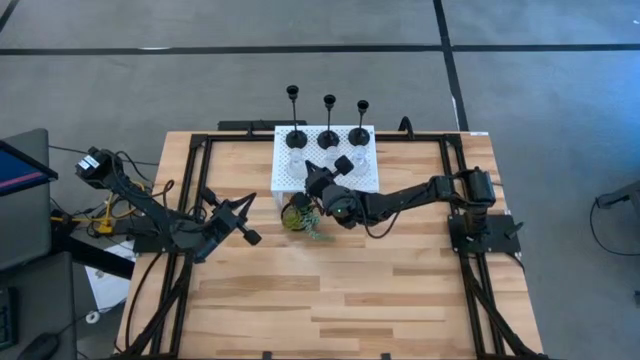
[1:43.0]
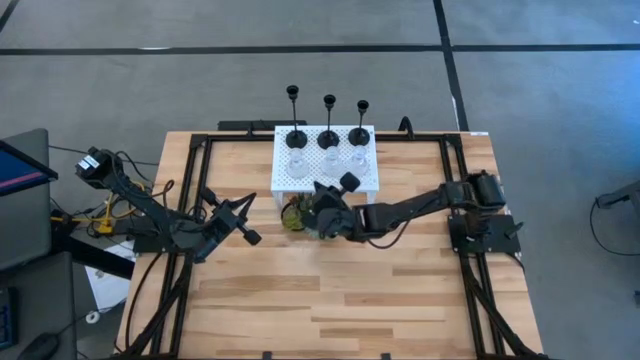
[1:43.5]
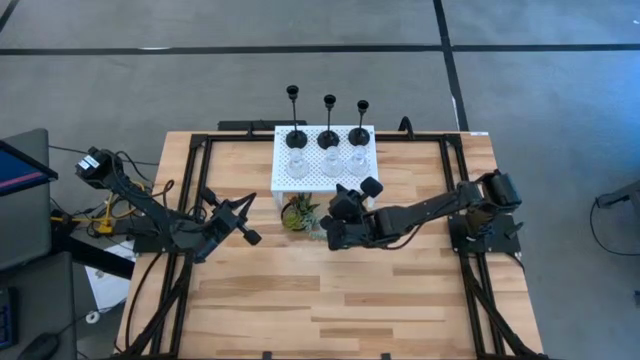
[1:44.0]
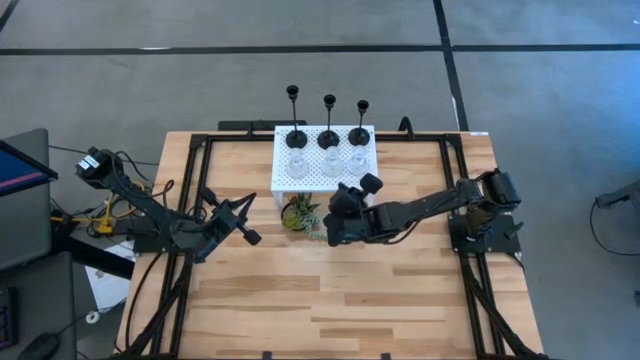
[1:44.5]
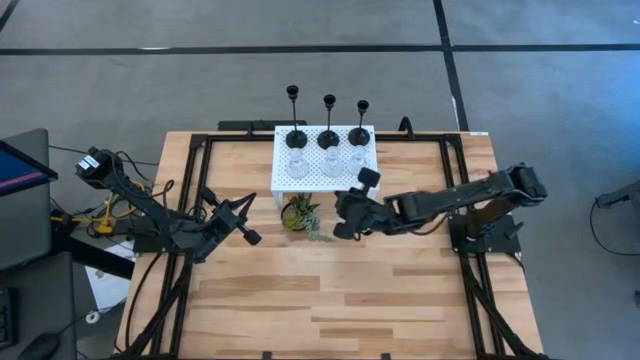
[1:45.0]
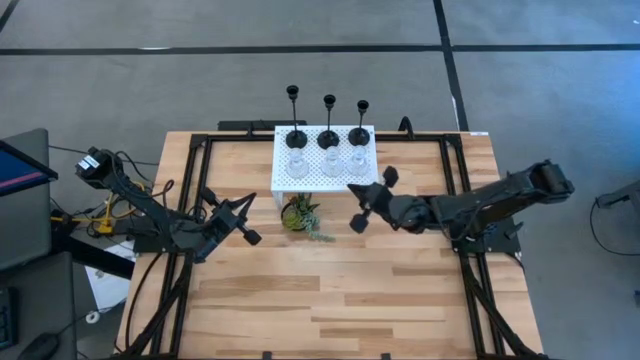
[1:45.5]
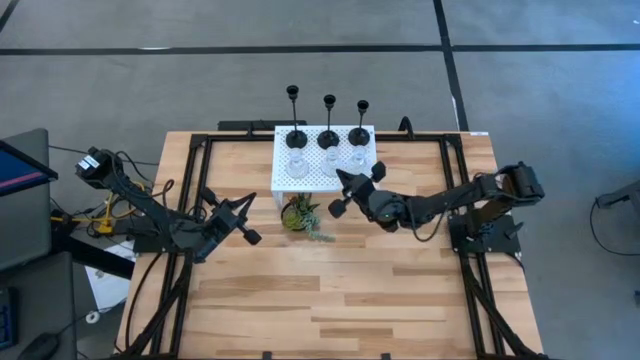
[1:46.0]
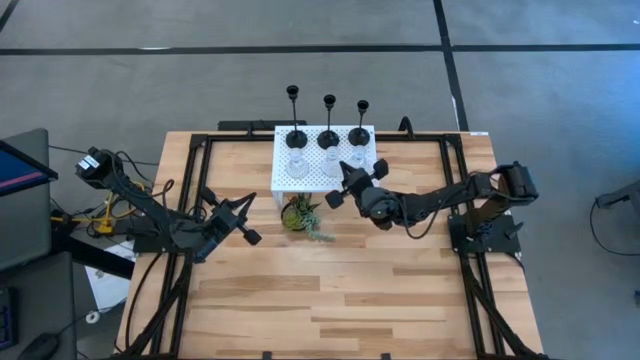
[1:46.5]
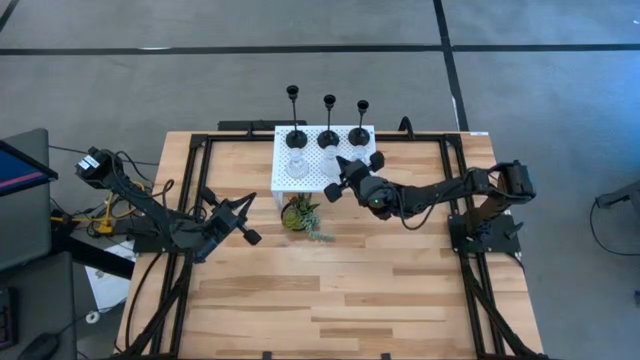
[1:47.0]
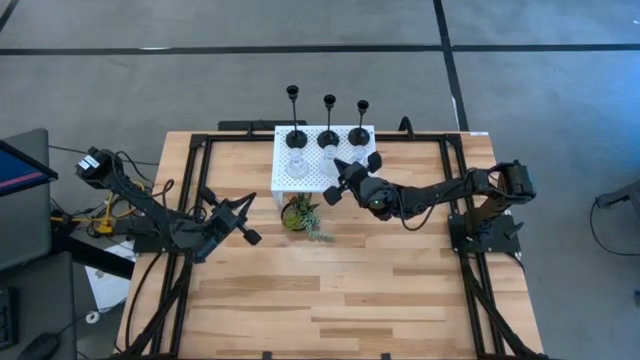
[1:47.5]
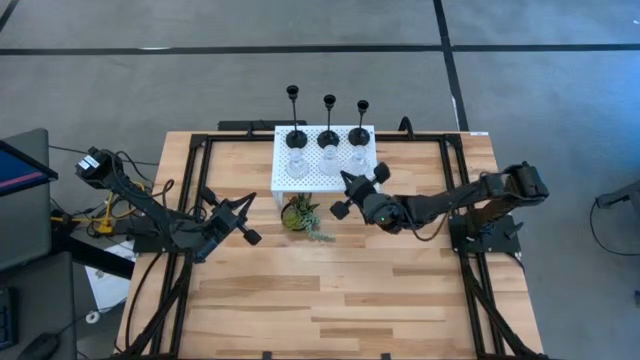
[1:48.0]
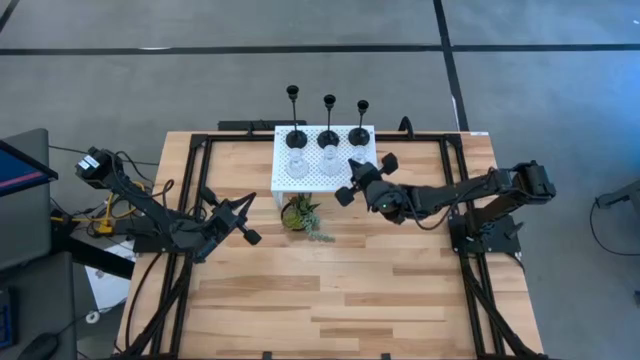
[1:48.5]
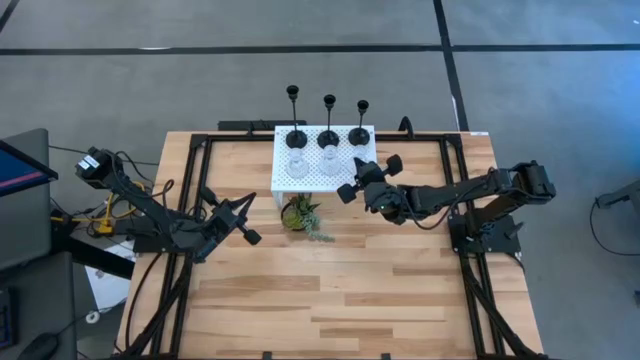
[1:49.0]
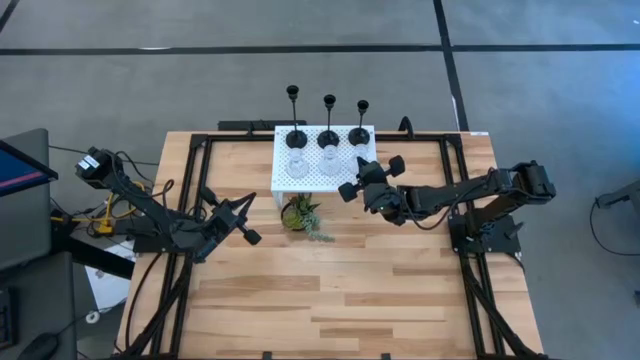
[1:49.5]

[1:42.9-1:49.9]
Task: Pick & Place candle stick holders
Adjust the transparent glass candle holders on the shelf

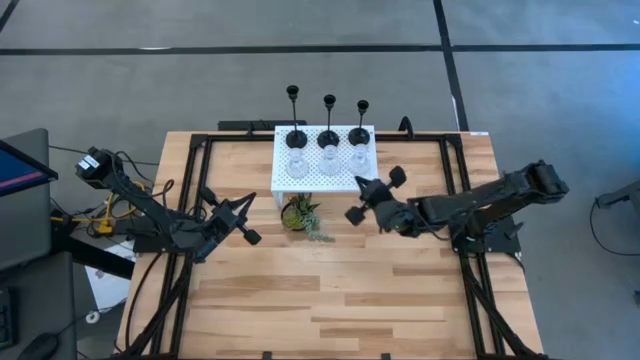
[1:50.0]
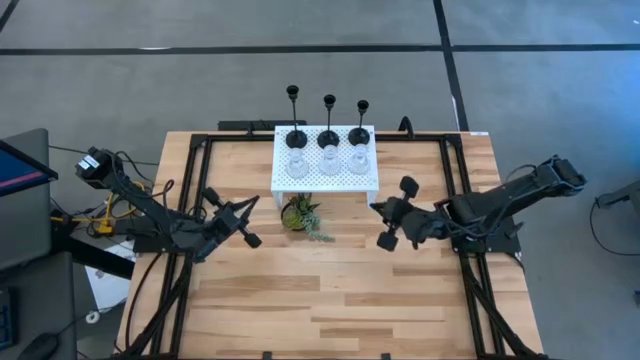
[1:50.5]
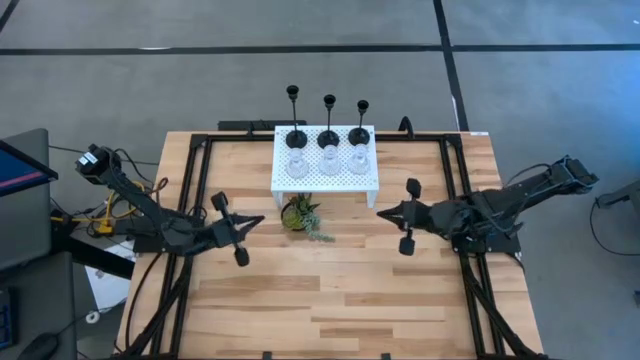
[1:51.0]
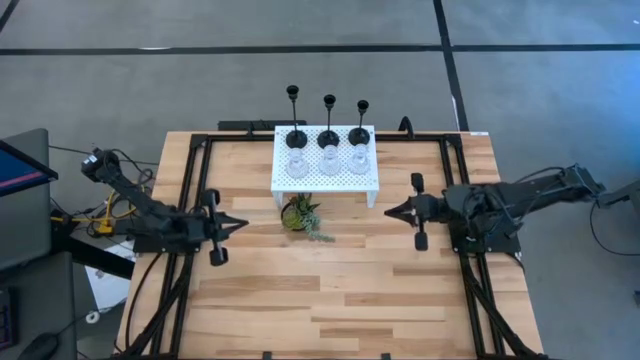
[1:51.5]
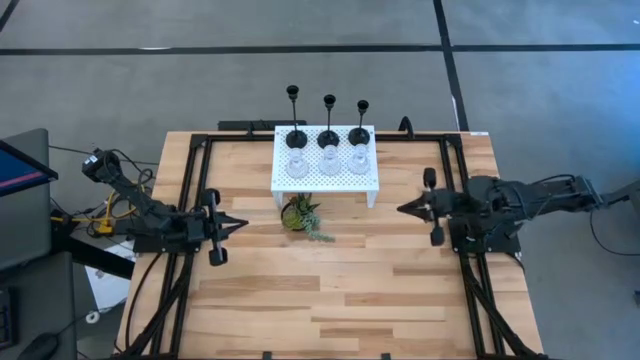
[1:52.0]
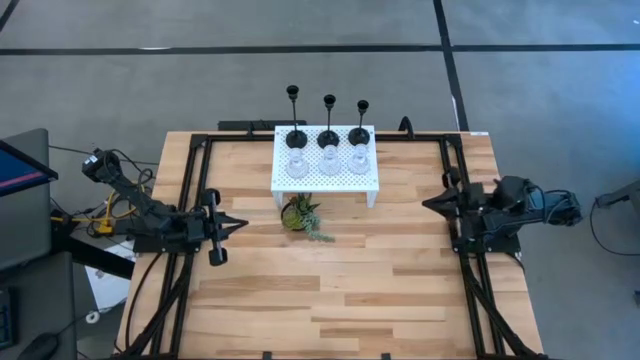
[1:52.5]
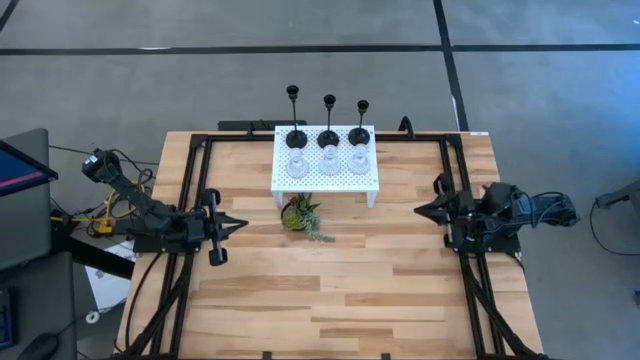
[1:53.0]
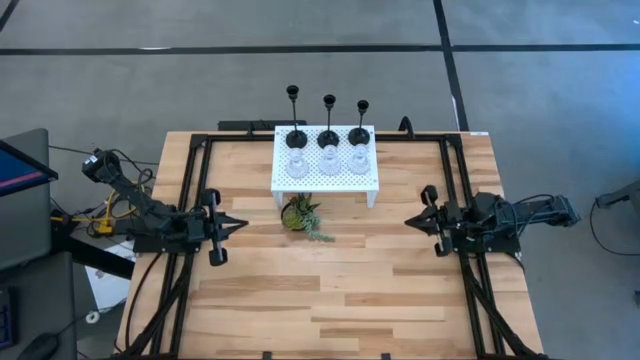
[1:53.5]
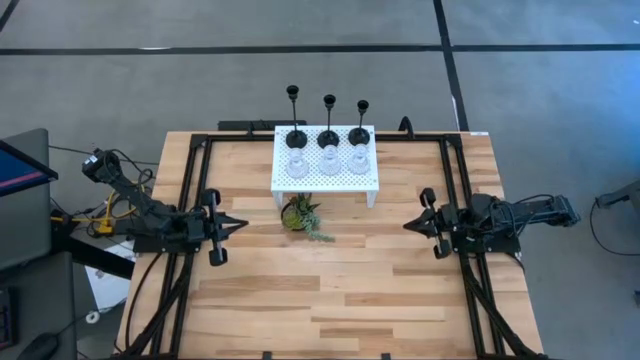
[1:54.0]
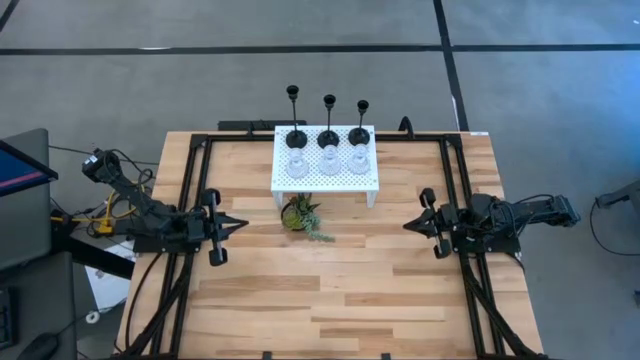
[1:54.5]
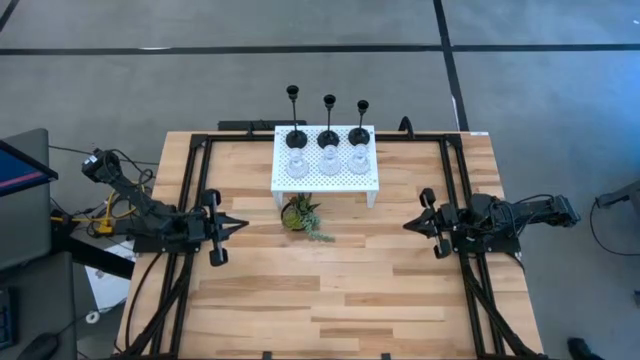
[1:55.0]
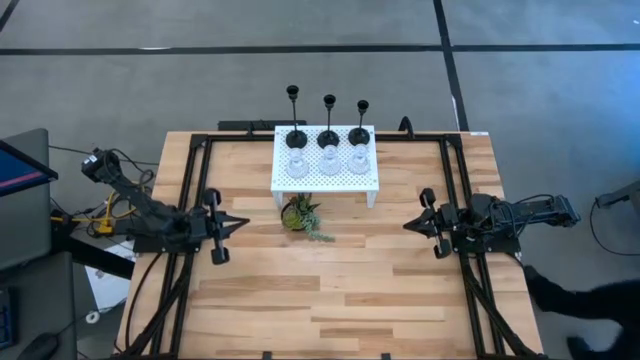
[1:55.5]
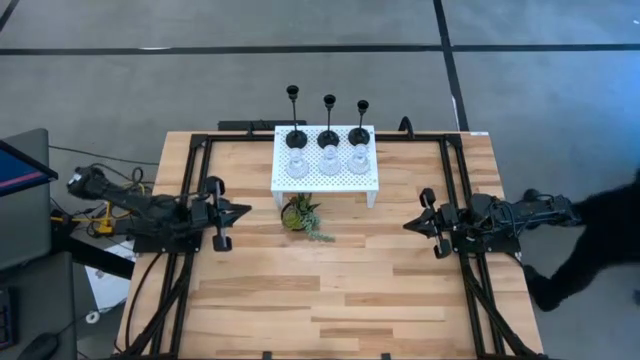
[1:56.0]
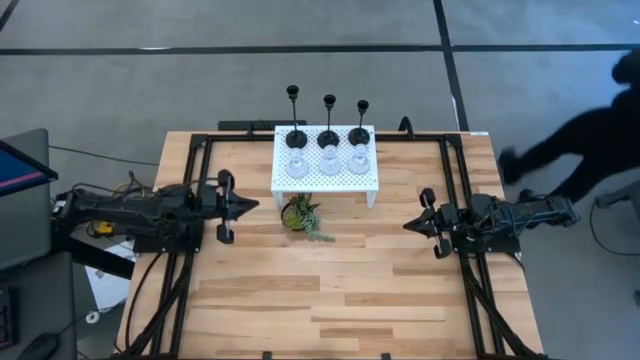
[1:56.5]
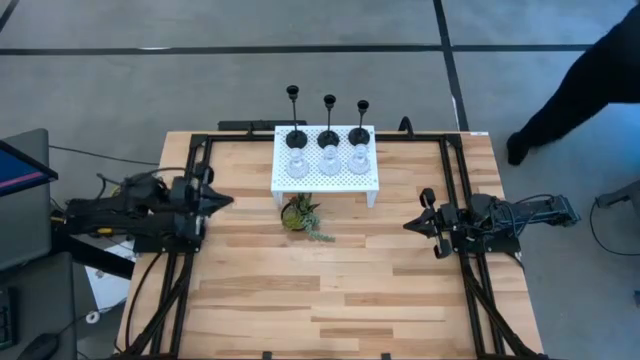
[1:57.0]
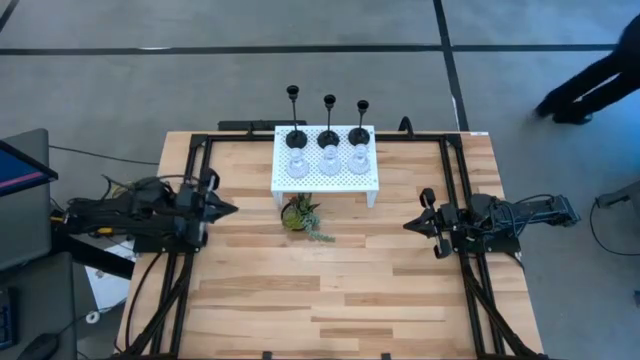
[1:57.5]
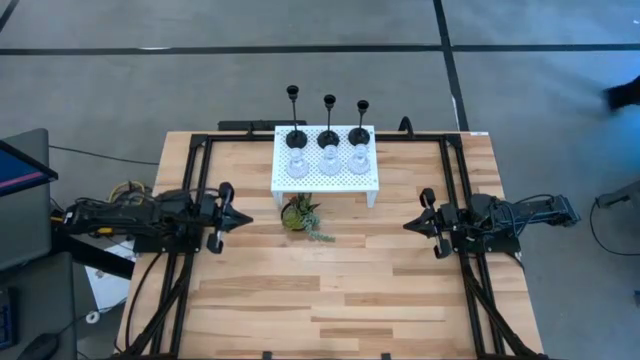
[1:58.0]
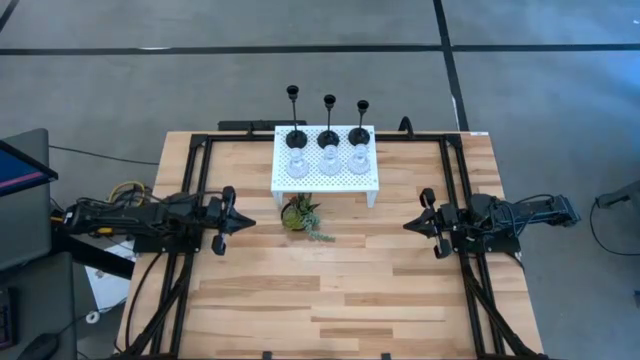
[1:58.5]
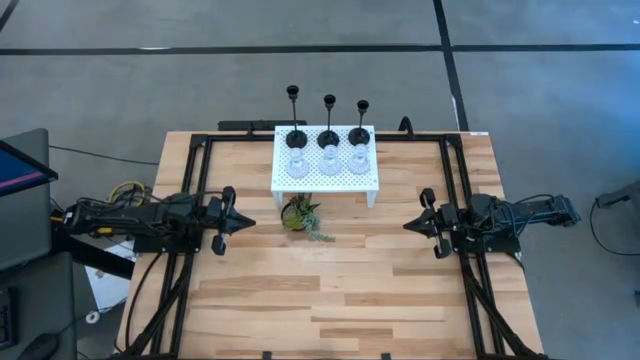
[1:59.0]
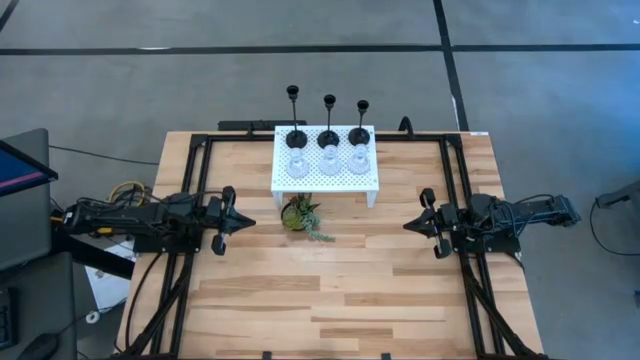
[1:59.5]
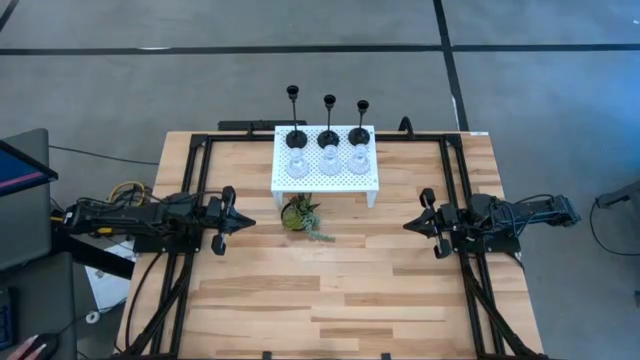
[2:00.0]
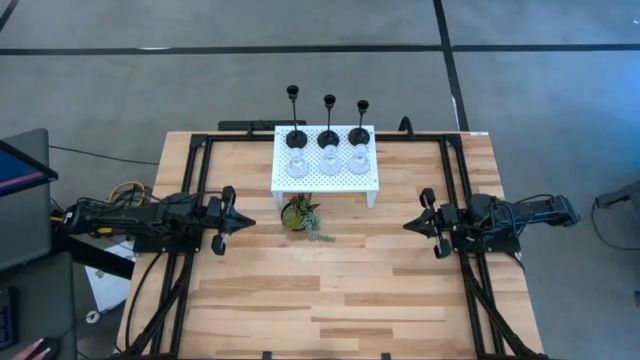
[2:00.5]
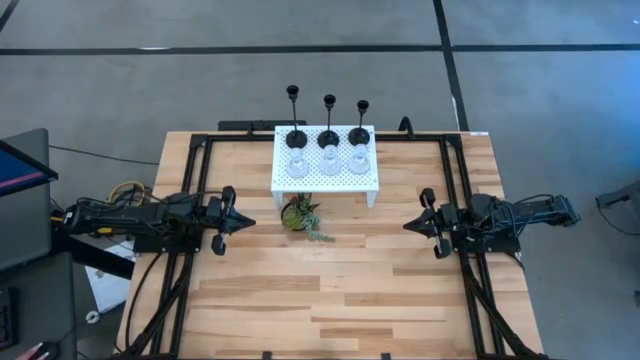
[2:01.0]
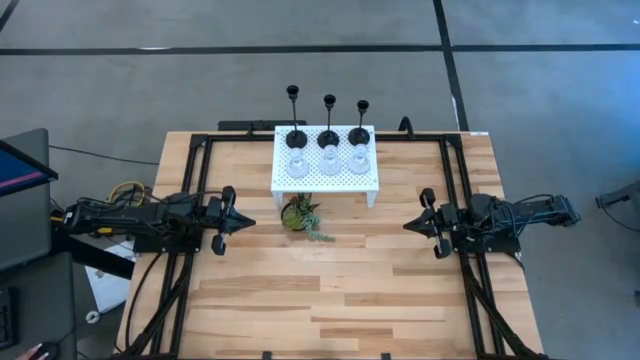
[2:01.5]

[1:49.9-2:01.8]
Return to Home Position

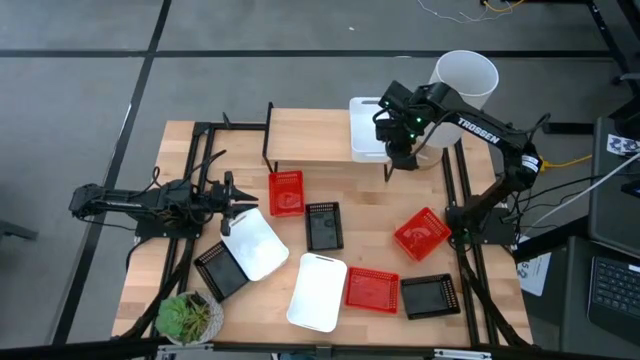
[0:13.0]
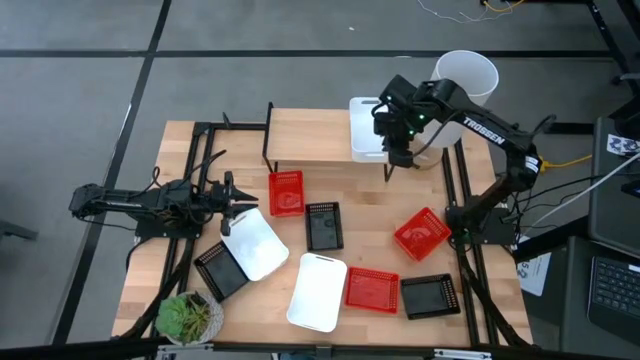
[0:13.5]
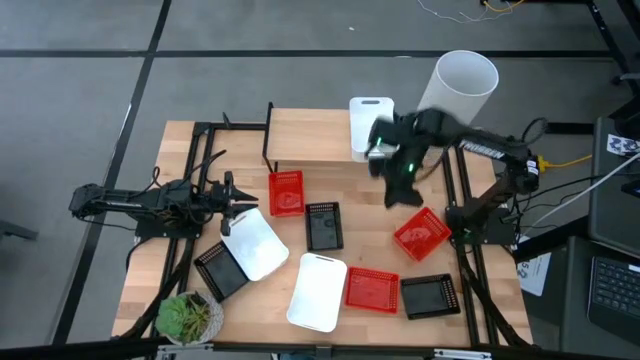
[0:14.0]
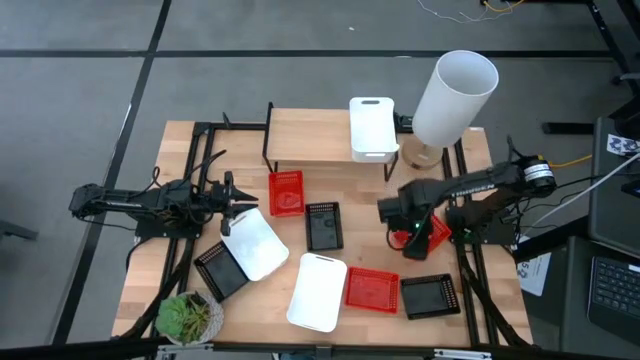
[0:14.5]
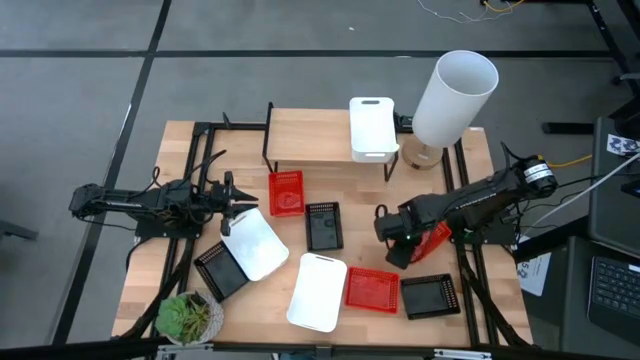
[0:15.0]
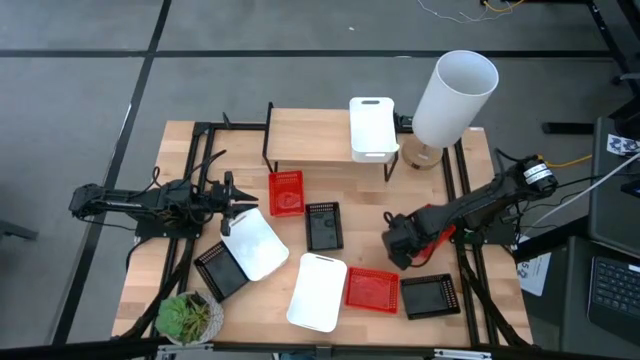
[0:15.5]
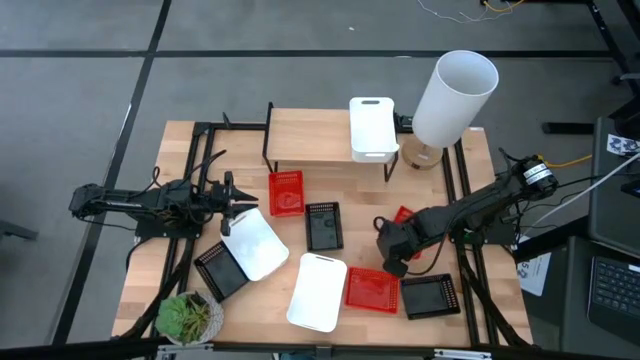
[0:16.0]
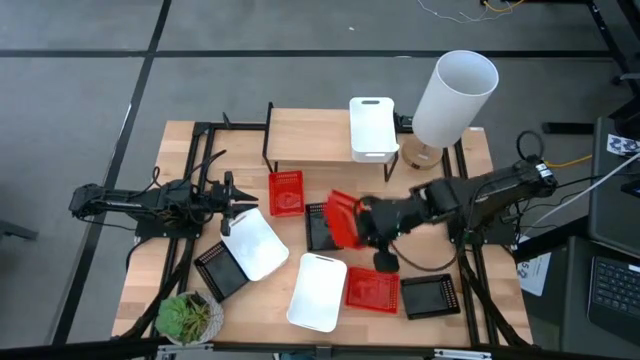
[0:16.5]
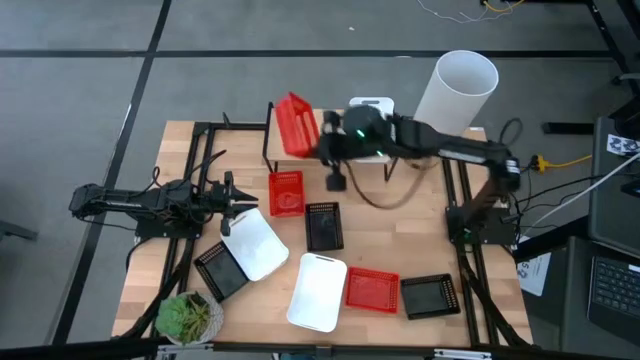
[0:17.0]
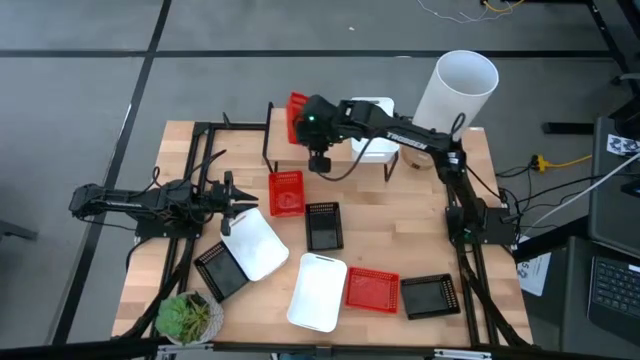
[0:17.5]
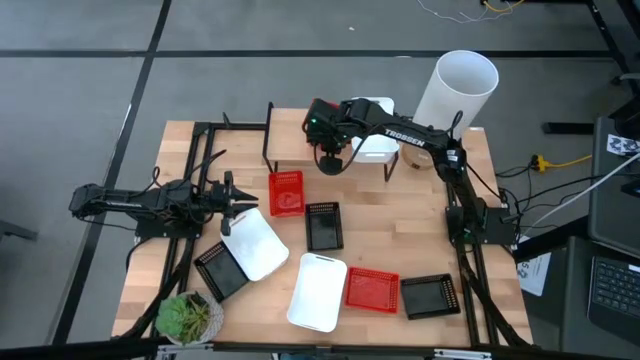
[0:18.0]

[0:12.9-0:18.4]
Task: Stack baskets on shelf by color
Put the middle right red bin on the shelf
